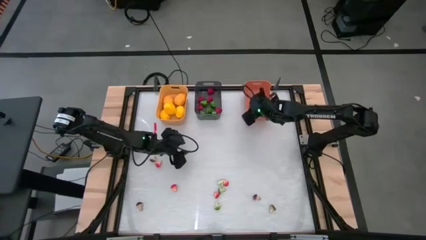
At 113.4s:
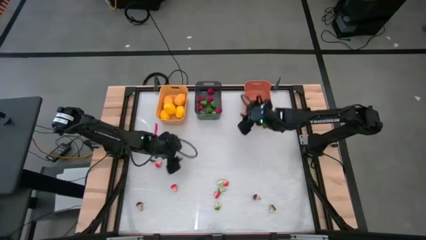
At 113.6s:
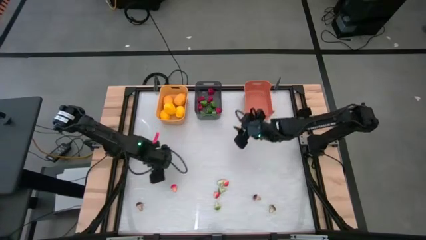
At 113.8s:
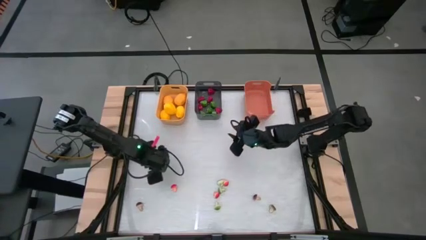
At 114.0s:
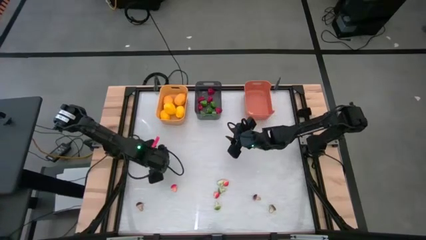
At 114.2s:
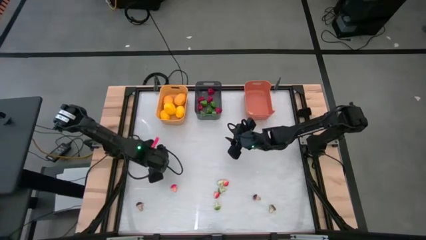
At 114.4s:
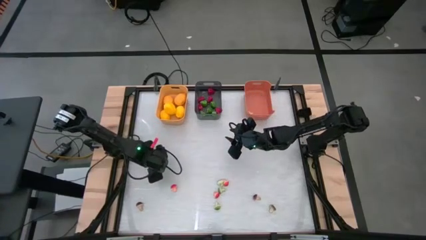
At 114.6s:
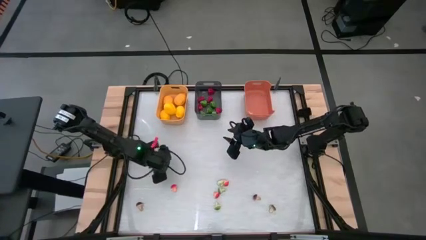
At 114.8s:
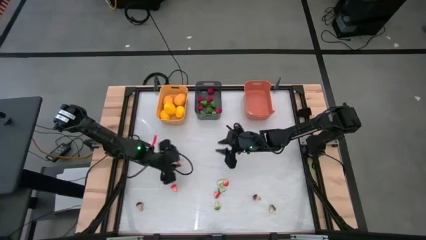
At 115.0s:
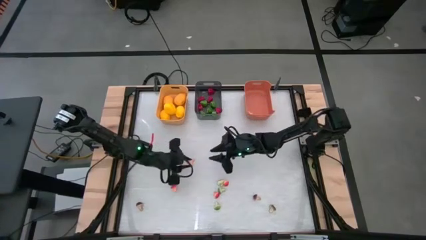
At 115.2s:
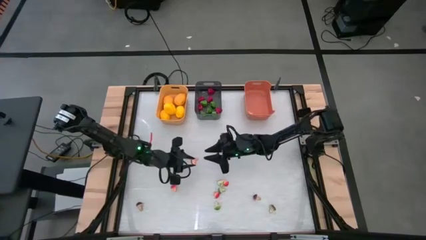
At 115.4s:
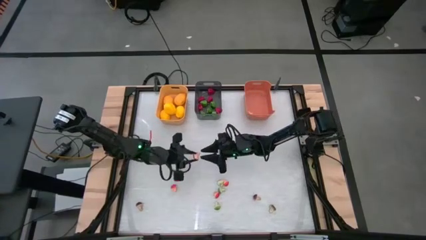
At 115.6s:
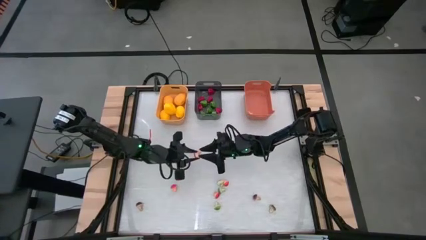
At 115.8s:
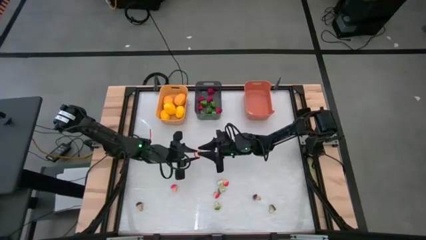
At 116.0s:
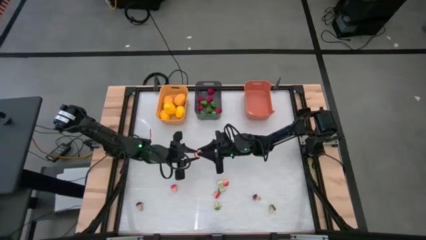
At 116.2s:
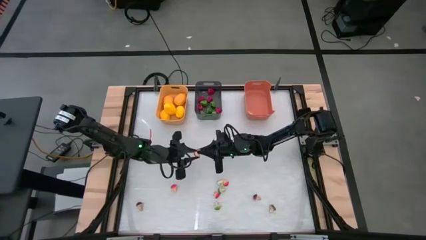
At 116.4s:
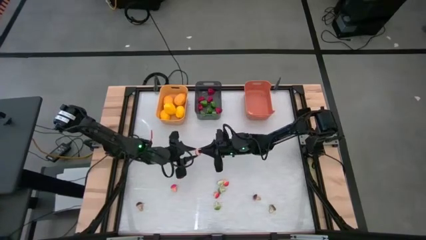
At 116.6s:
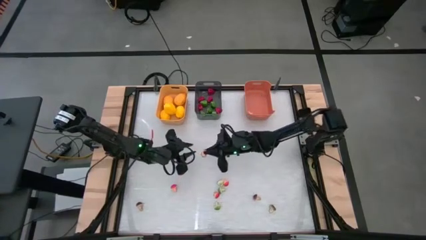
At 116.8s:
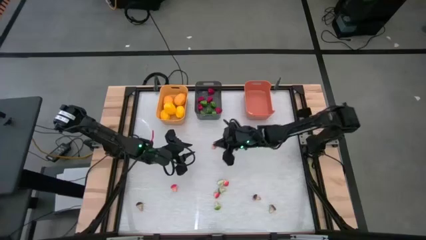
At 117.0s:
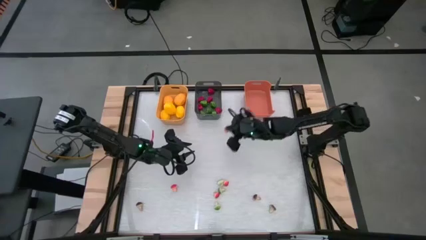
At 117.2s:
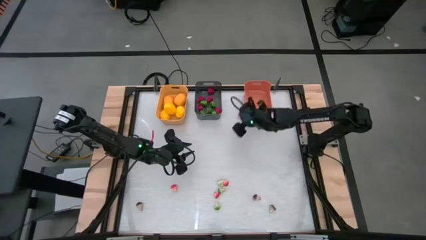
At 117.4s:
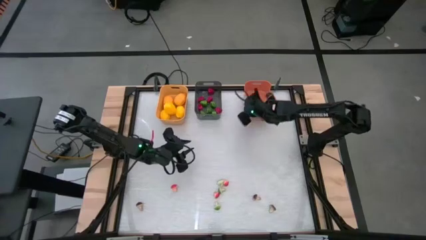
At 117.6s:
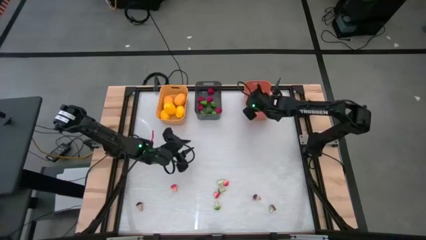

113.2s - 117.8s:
Task: Sort produce into baskets
Put the red mushroom into the orange bin

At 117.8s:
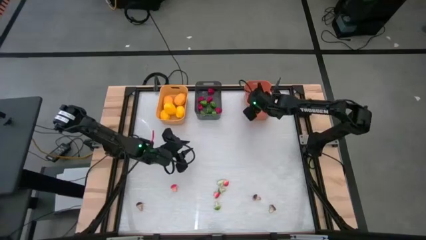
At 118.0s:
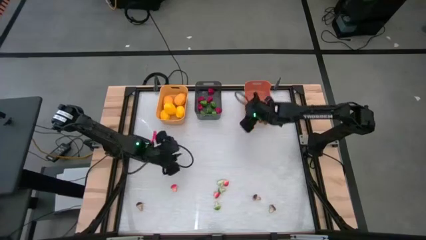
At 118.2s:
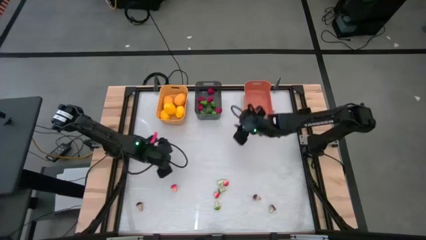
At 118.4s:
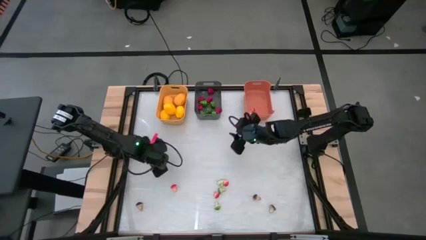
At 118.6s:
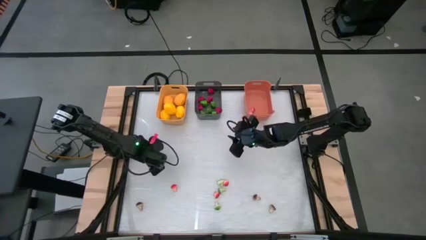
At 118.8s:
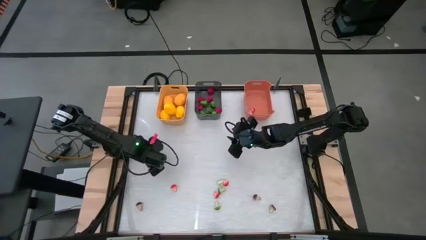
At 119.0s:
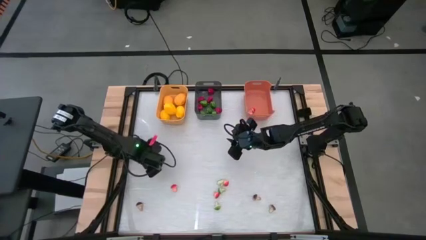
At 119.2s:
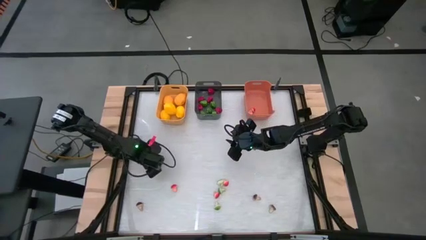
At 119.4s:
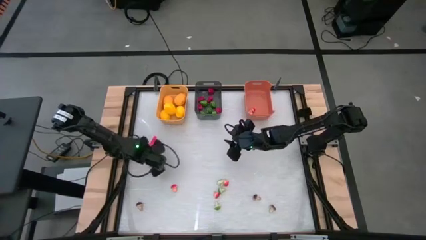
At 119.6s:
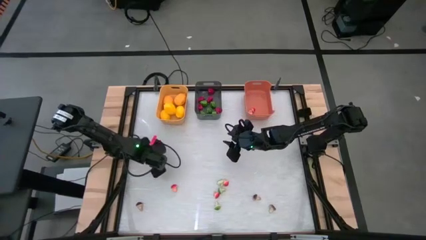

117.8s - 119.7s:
Put the brown mushroom into the orange bin

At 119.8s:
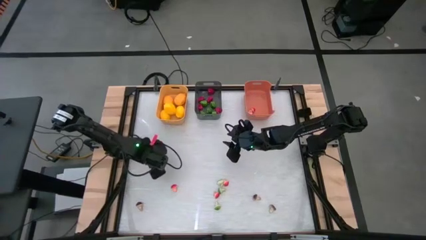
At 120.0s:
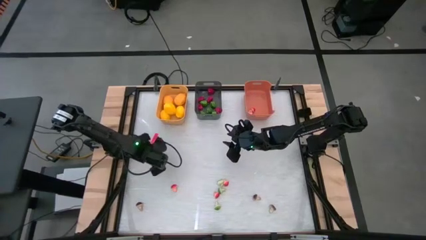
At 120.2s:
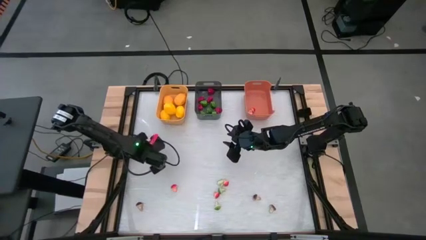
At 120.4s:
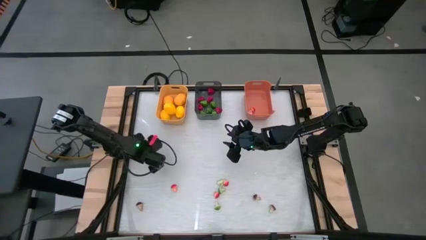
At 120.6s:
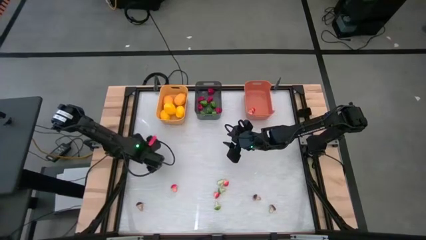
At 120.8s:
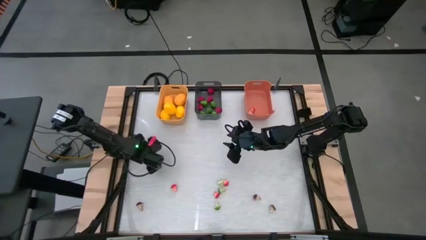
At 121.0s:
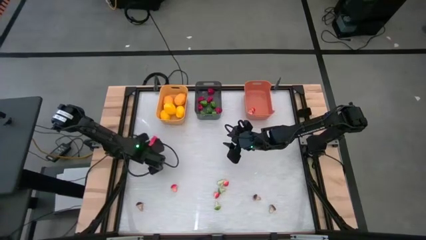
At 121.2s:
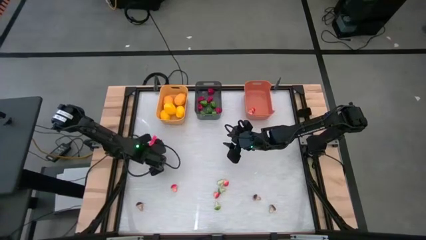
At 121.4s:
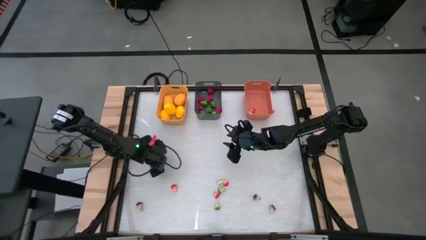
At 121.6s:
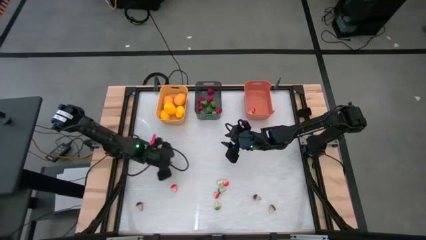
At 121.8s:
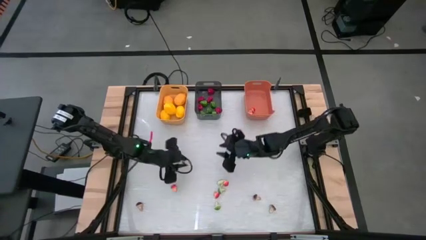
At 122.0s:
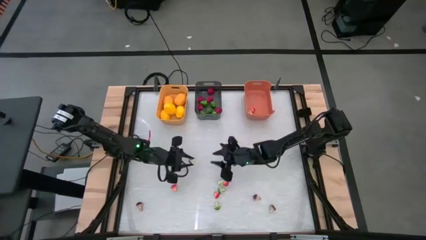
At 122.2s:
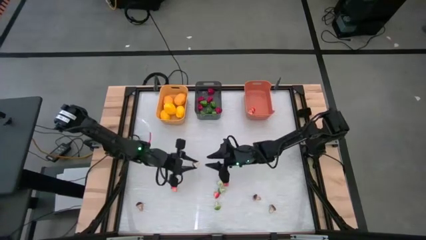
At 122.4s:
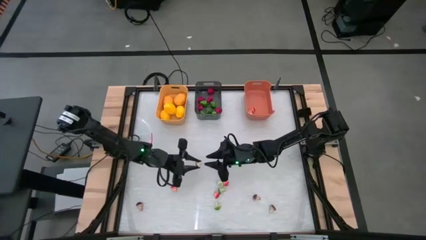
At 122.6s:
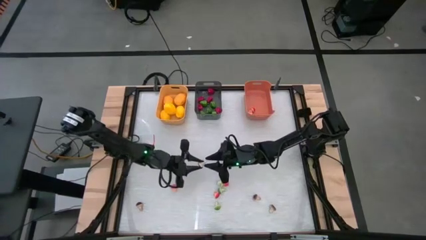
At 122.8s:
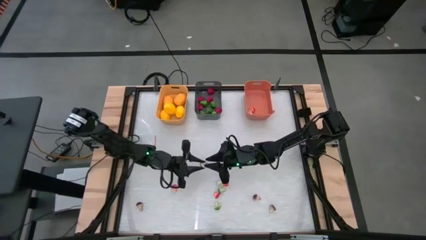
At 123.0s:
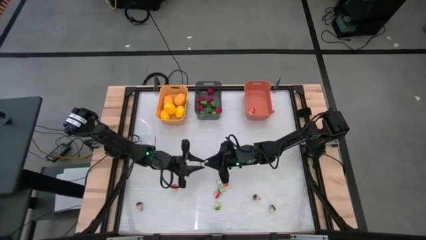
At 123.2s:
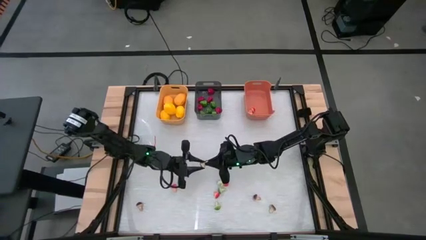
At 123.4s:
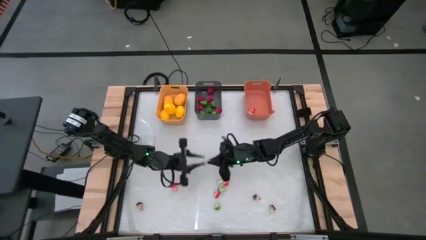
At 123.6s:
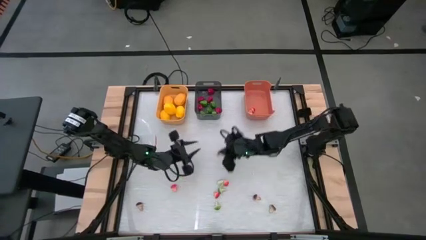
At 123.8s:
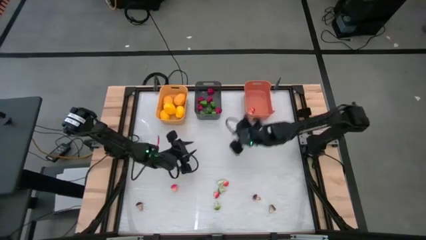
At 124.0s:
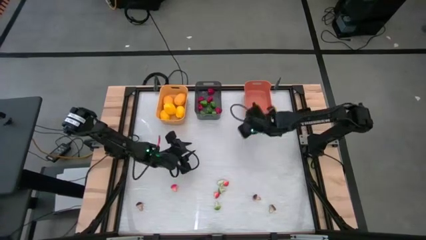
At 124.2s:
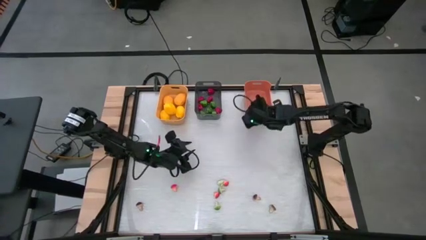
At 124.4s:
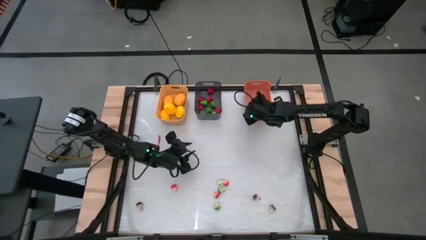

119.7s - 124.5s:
Put the brown mushroom into the orange bin

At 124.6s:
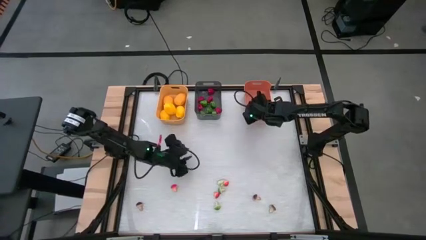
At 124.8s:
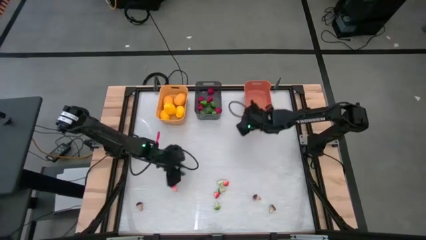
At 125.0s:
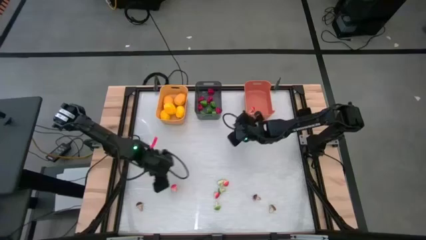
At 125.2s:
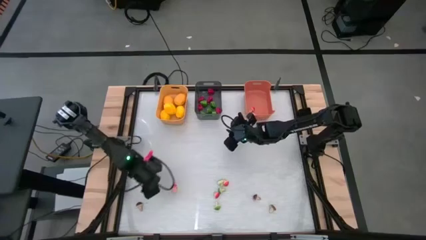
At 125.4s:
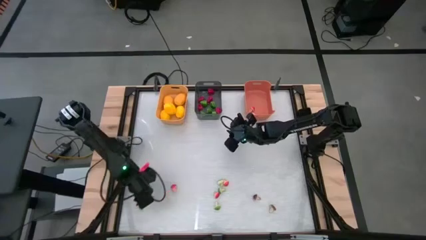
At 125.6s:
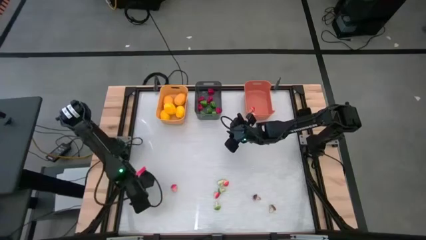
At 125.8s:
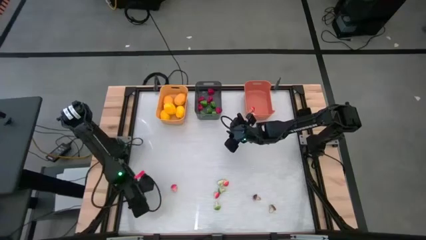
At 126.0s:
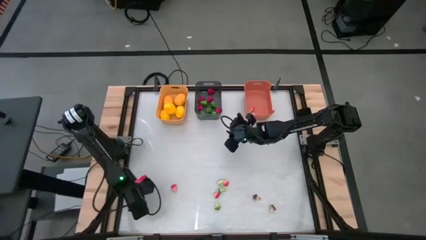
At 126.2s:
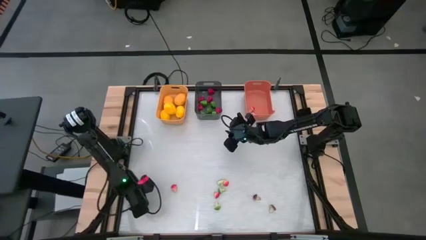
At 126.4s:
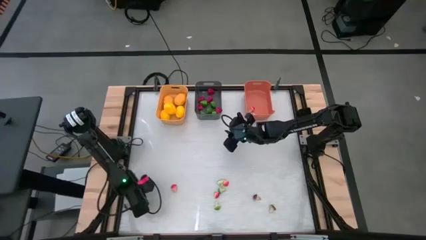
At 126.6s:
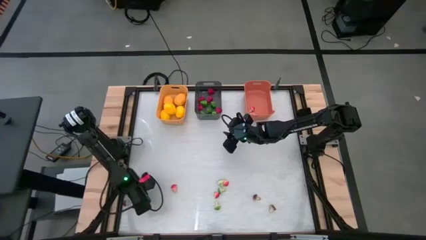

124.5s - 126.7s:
Put the brown mushroom into the orange bin

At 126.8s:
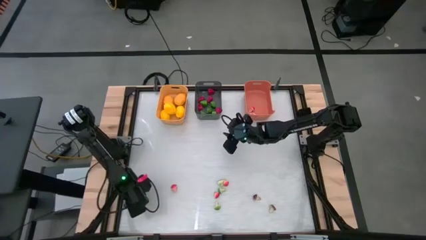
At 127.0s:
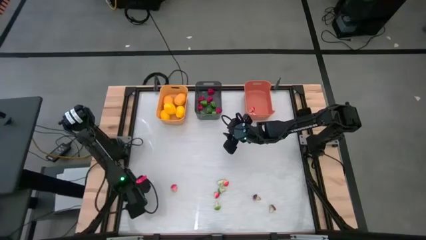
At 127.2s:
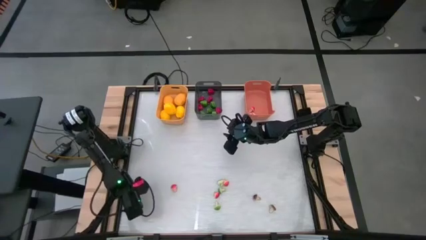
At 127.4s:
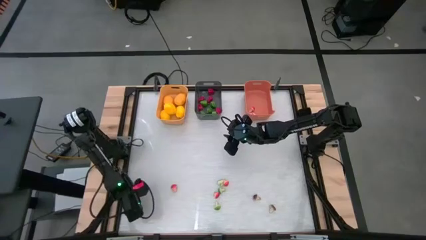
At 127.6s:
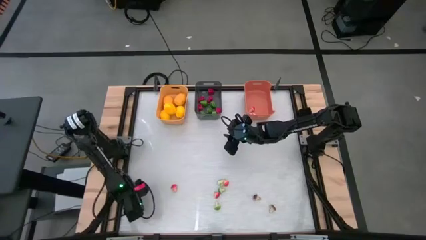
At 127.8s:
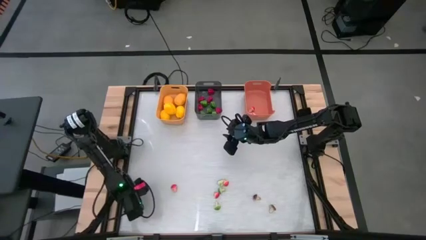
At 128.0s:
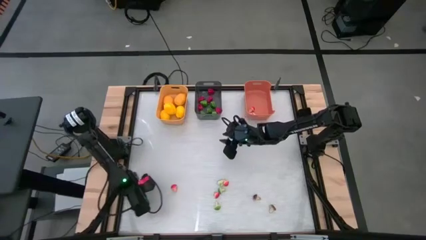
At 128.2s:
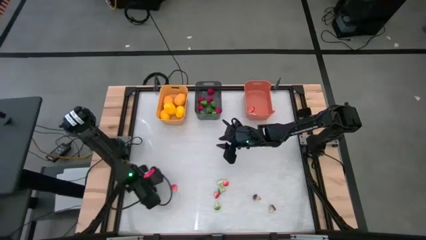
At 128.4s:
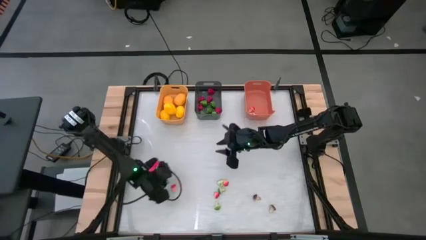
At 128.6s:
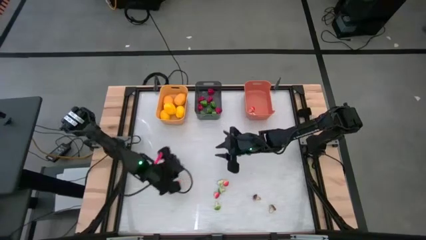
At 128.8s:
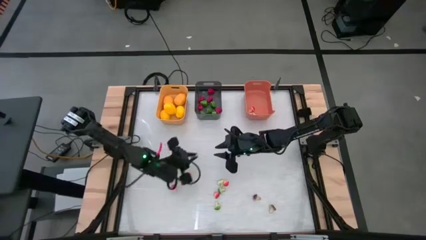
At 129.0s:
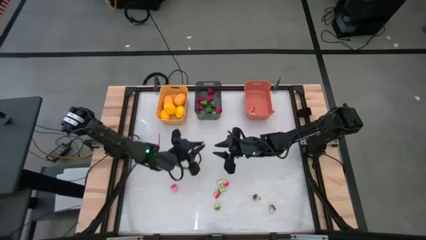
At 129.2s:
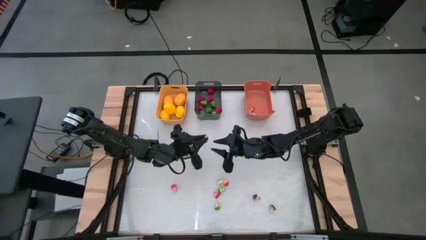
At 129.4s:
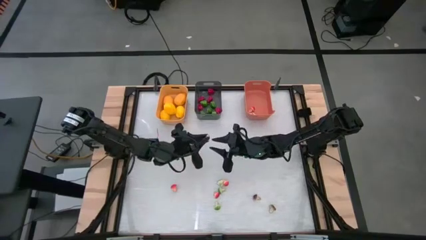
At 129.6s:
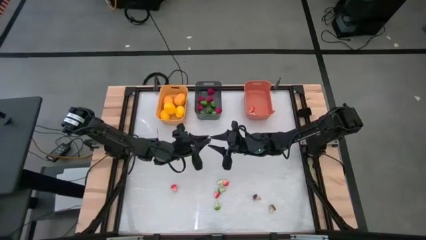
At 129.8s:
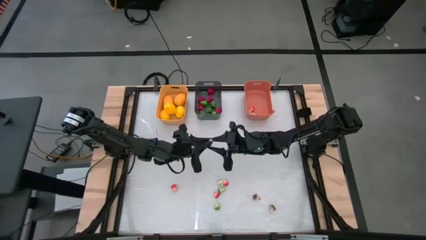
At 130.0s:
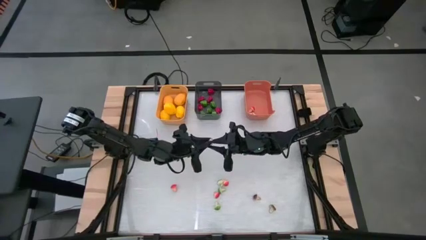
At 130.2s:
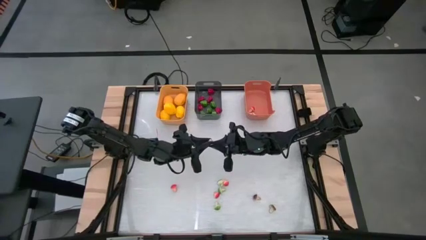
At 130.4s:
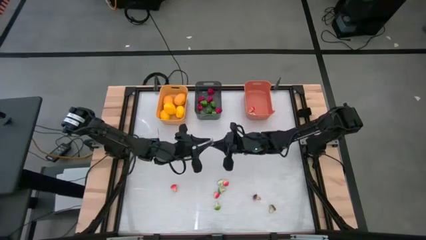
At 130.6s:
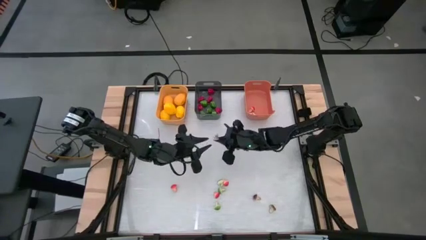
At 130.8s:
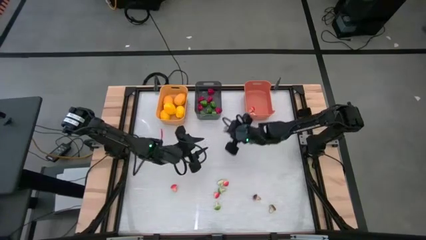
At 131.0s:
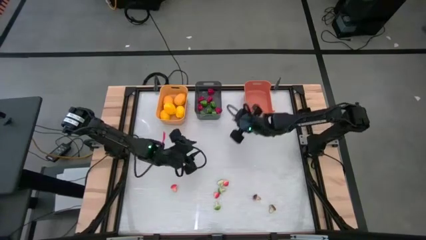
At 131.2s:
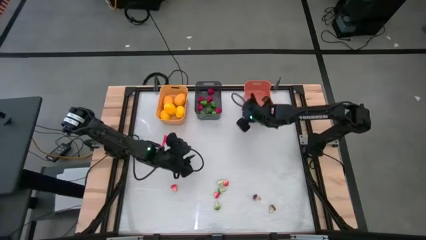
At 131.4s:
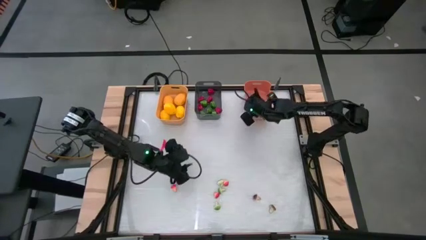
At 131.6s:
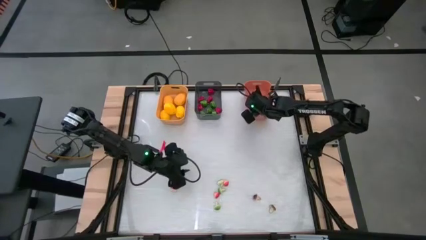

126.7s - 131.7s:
Put the brown mushroom into the orange bin
